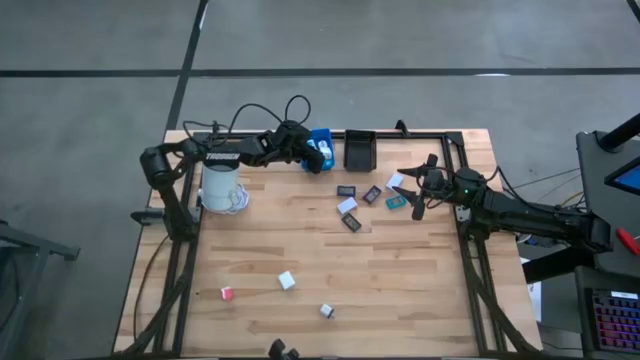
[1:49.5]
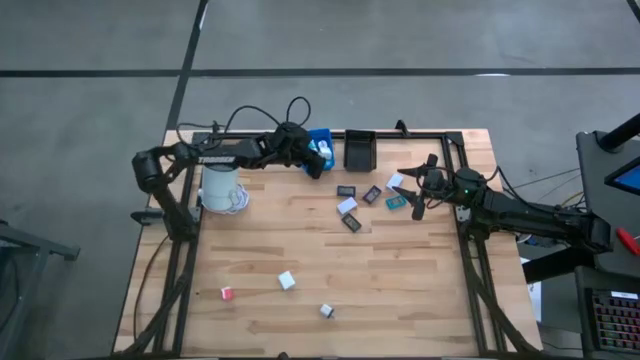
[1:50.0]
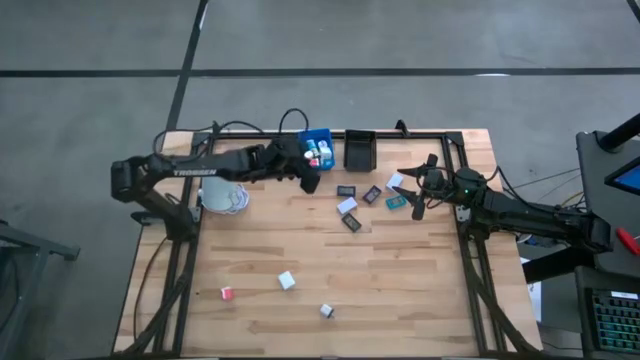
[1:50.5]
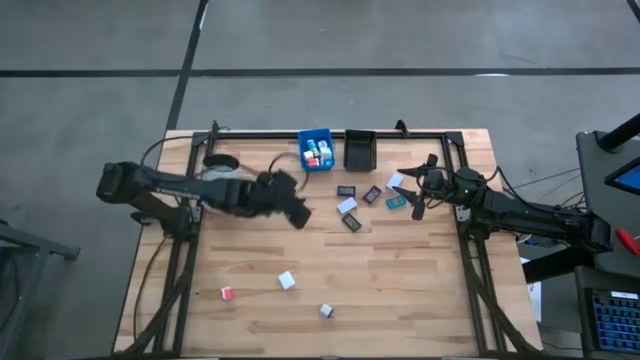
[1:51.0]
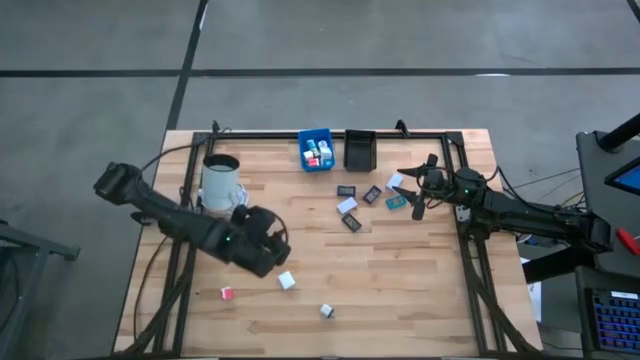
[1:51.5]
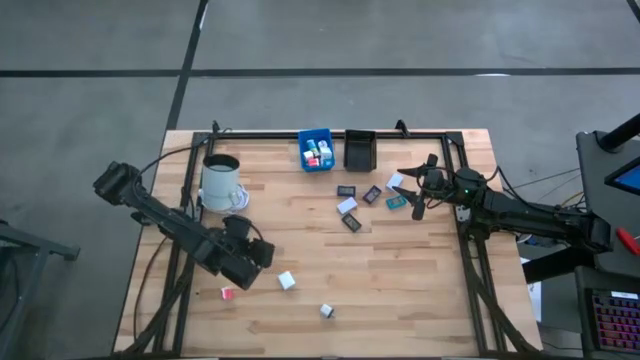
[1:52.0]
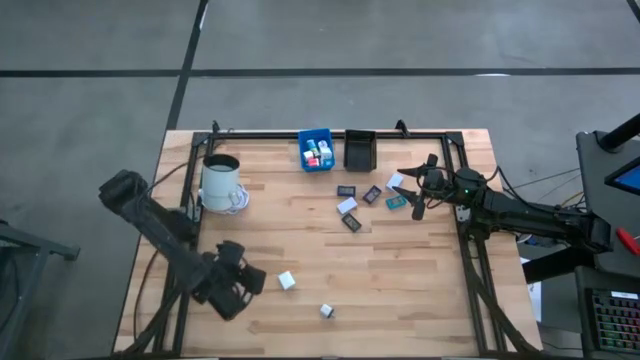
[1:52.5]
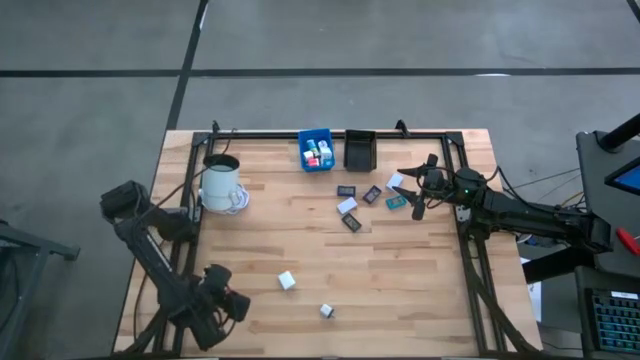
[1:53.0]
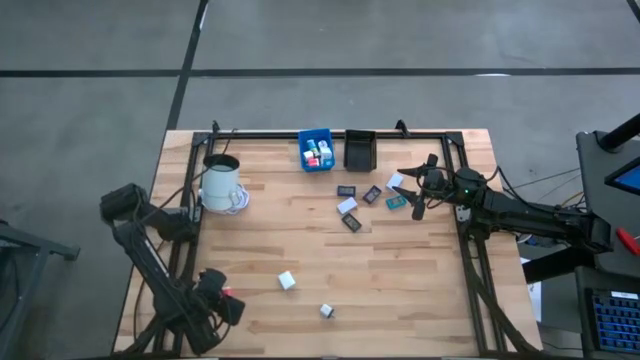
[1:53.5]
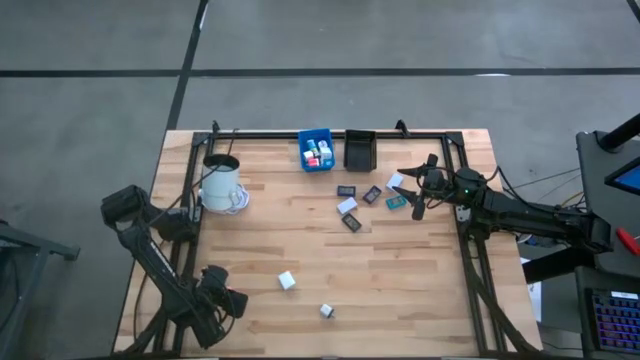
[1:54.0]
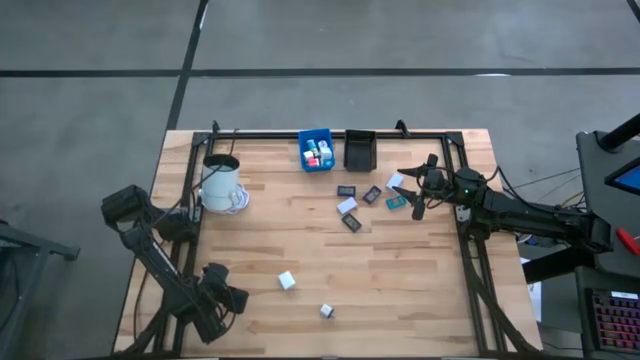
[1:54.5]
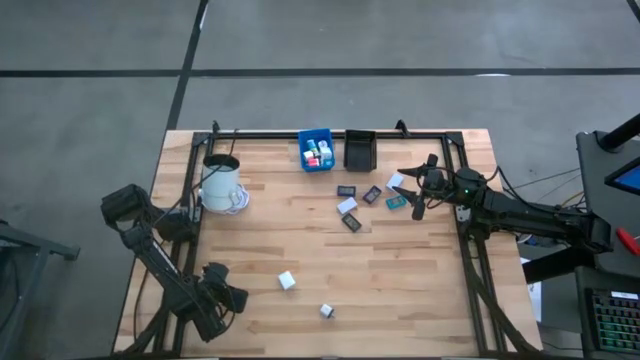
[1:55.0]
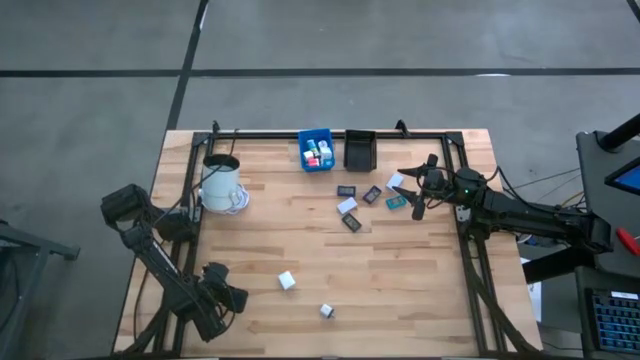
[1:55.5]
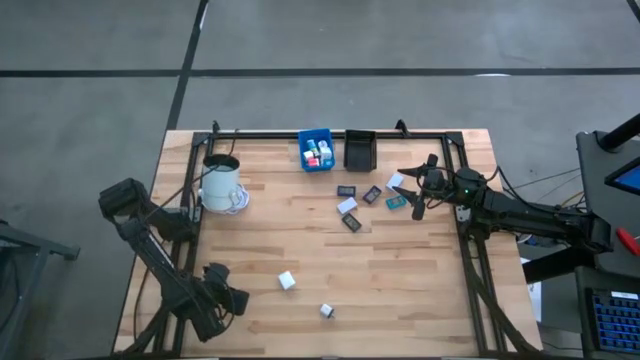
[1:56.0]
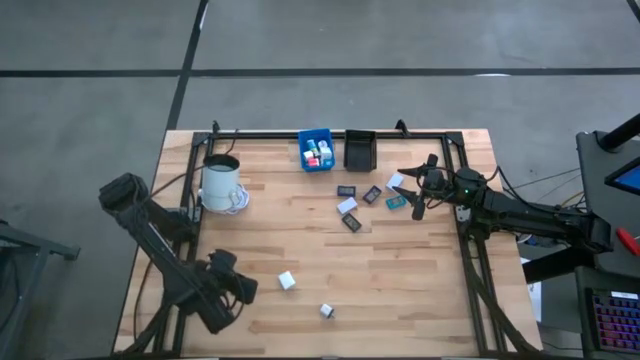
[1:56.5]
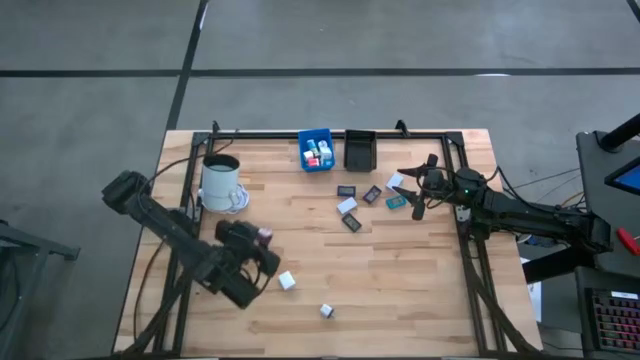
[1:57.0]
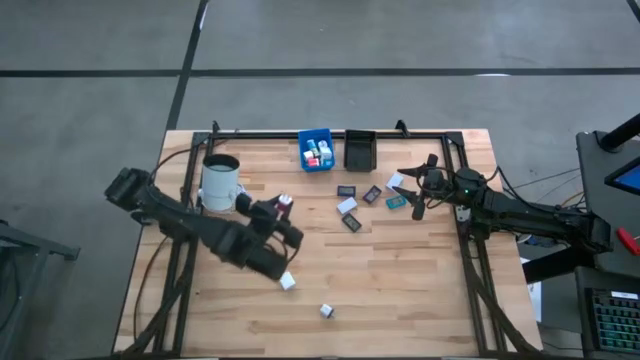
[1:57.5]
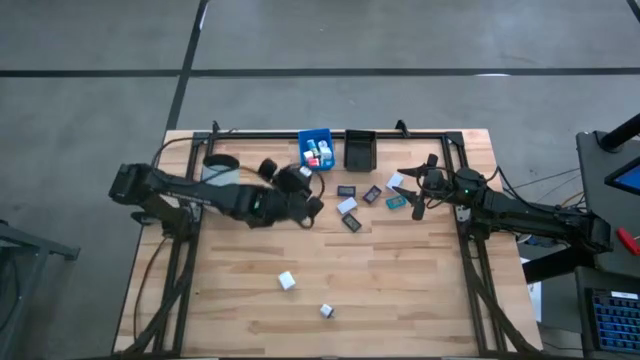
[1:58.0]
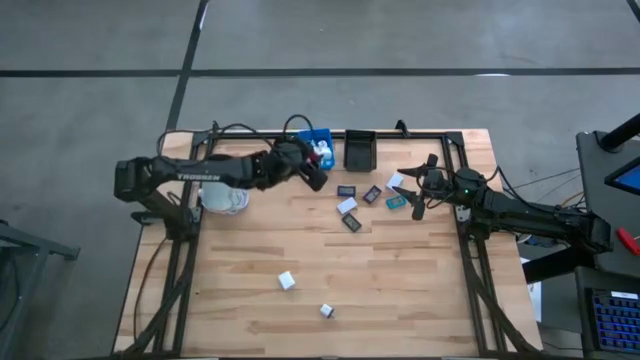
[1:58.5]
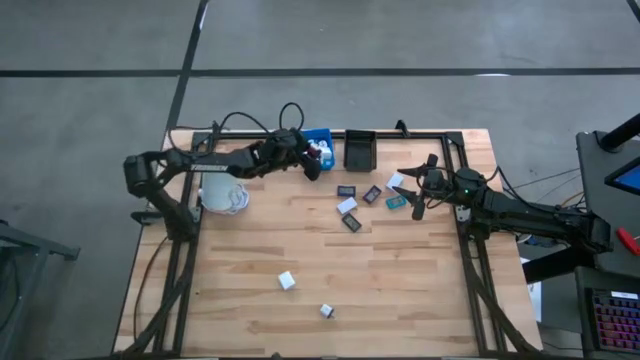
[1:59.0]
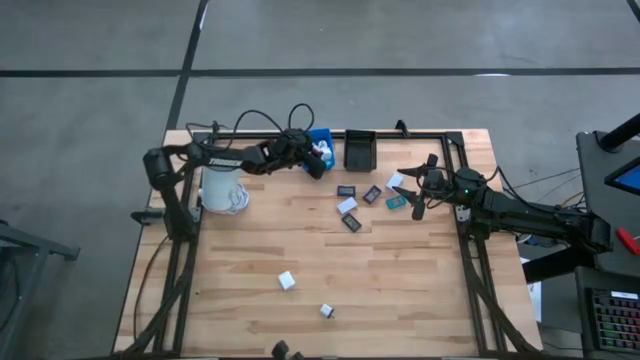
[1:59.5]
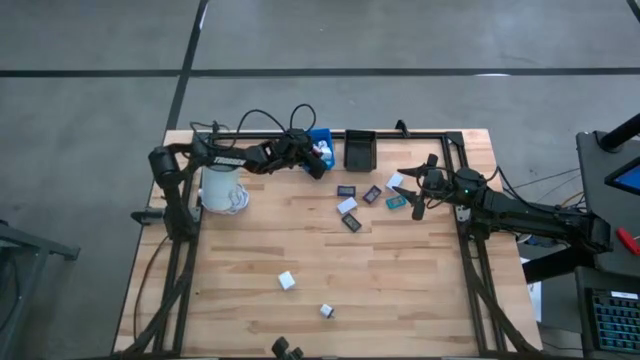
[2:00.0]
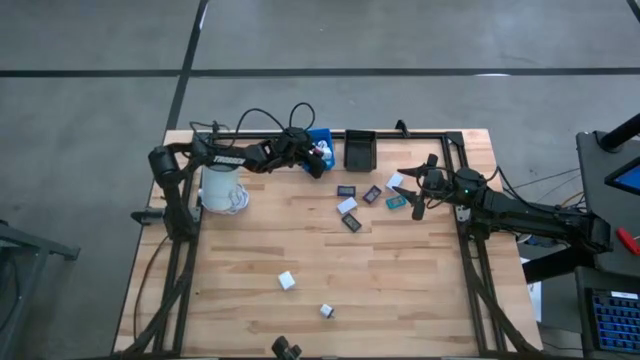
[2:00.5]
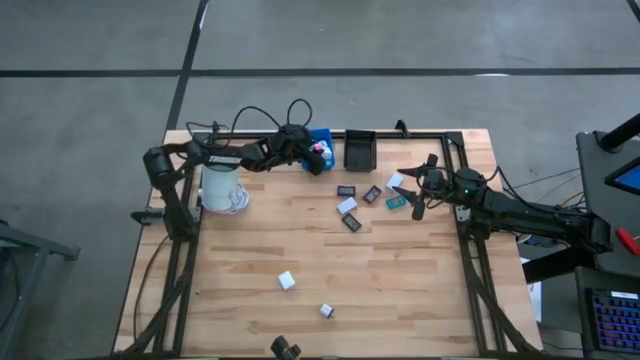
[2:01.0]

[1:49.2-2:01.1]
Task: Pick & Place Office items
Put the small red adapter into the blue basket

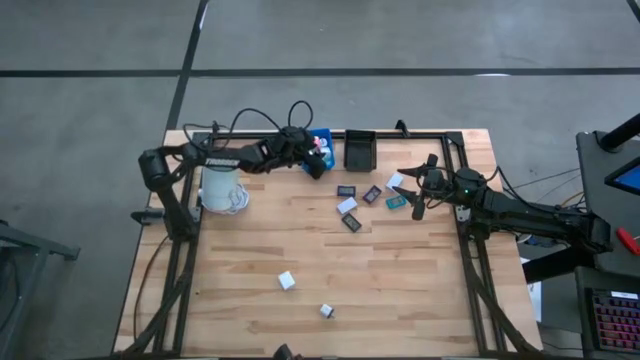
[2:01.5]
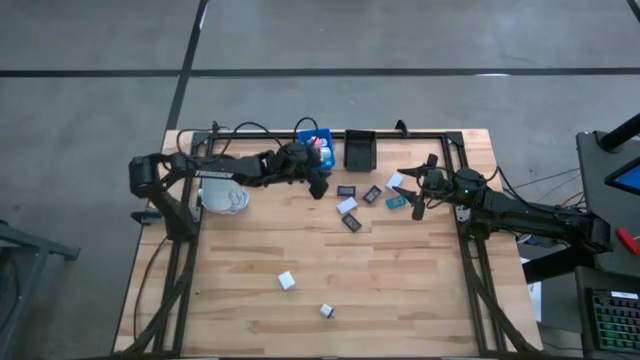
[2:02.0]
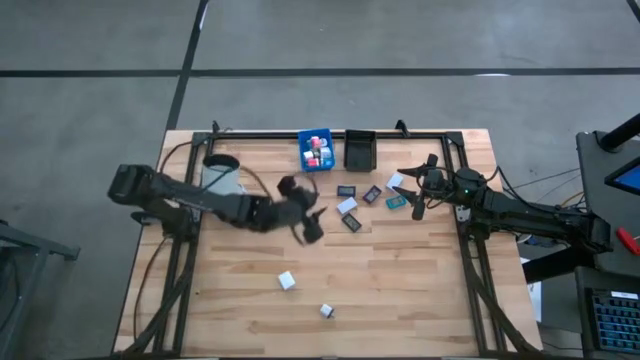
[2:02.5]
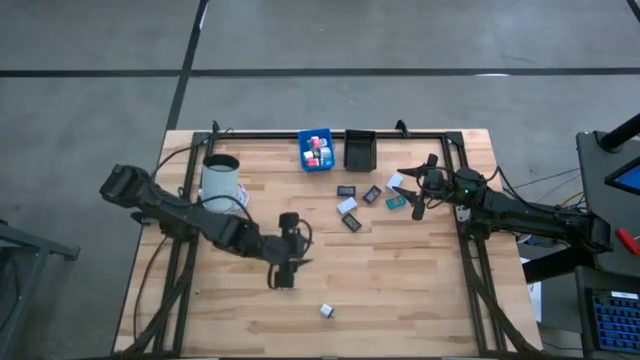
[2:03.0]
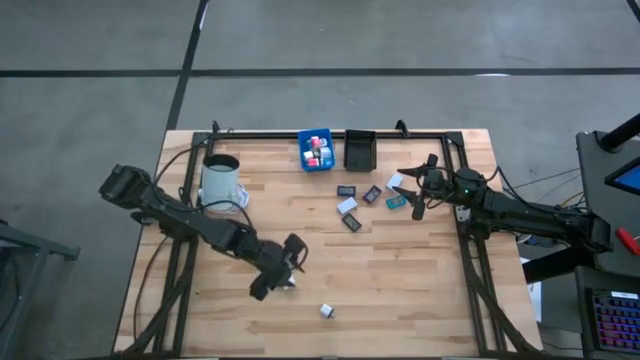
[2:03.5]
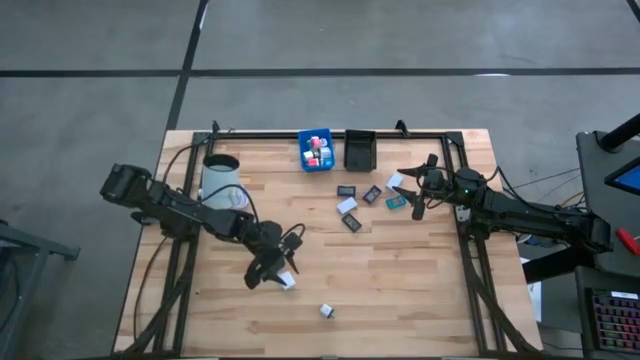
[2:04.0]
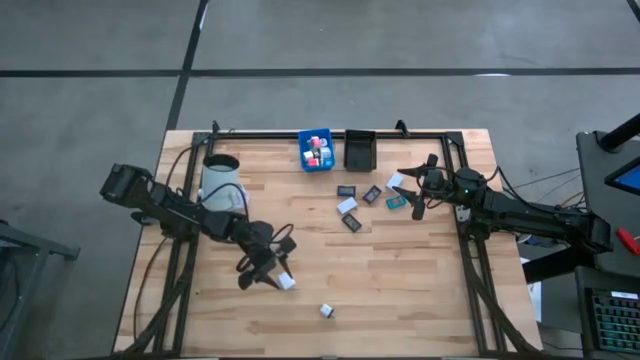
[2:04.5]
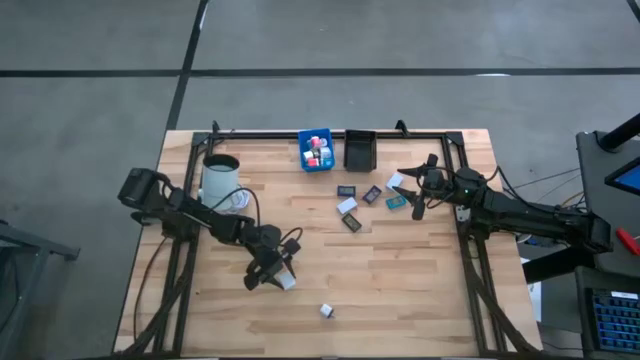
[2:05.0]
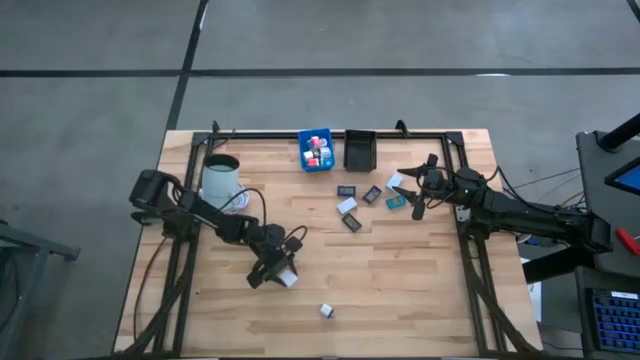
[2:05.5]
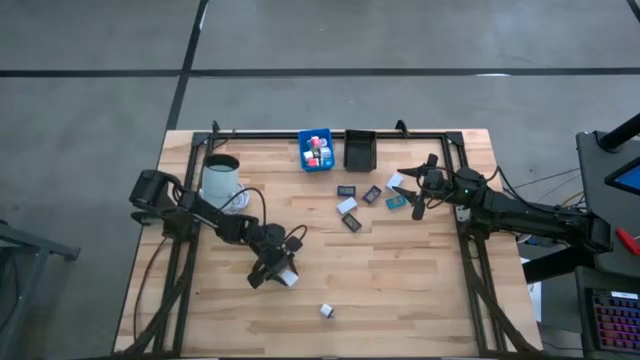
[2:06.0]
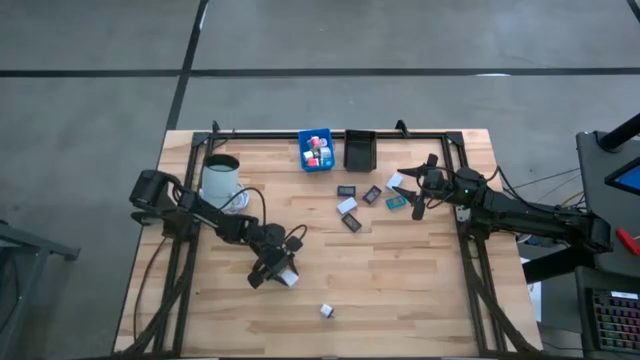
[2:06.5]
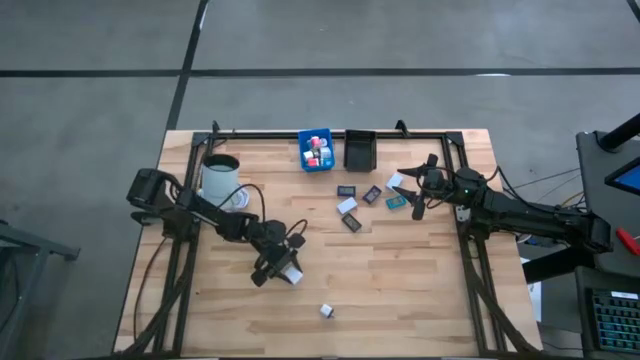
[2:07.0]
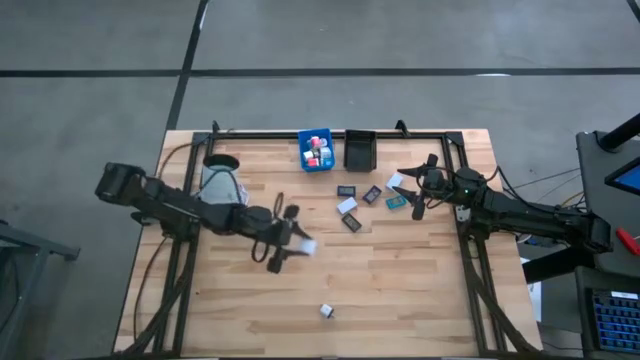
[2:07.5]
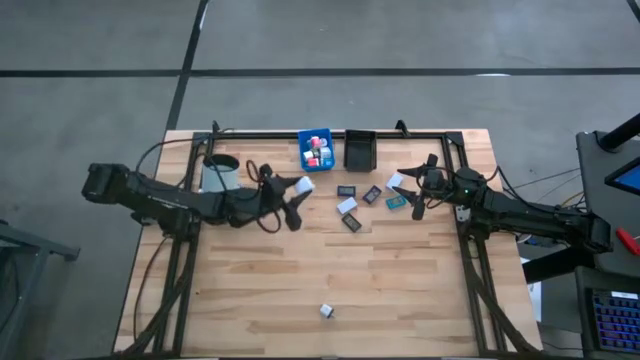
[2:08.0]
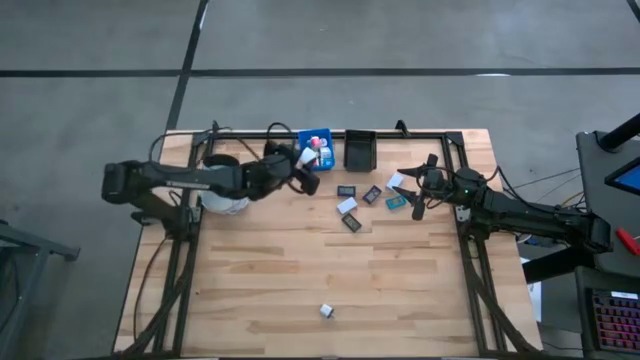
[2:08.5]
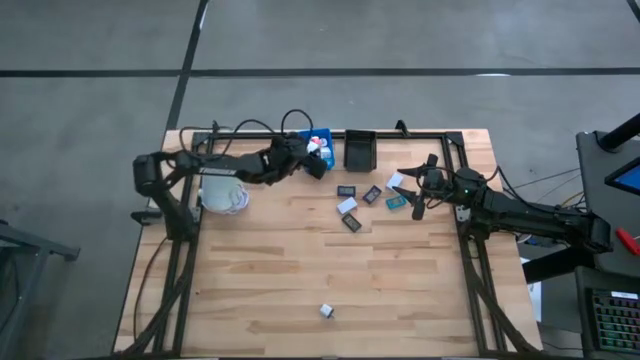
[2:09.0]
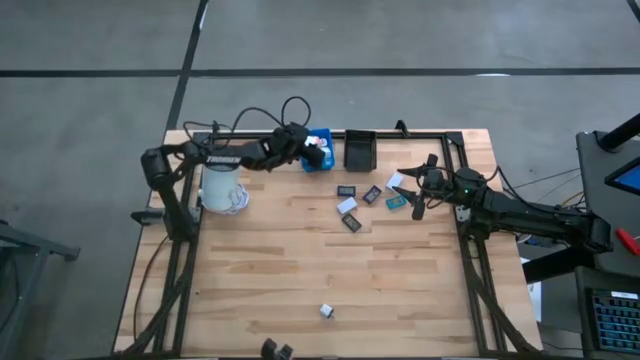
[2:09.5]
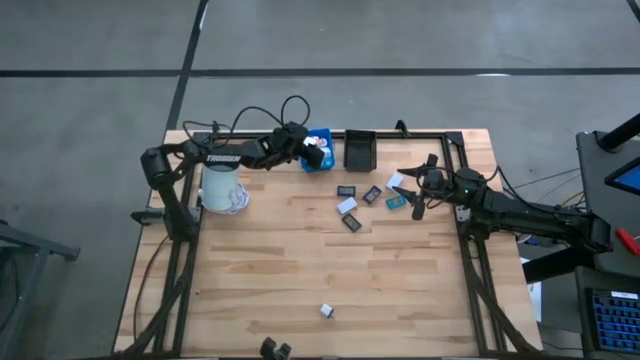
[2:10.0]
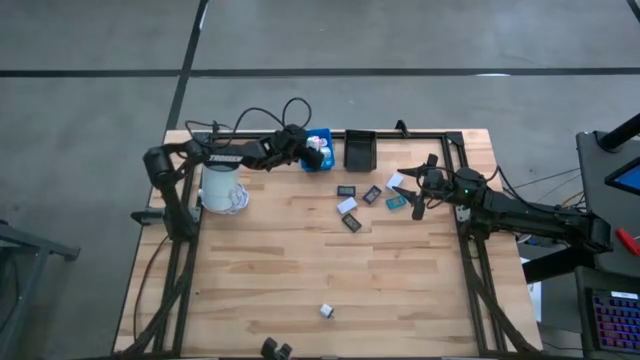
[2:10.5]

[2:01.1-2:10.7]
Put the big white adapter into the blue basket
